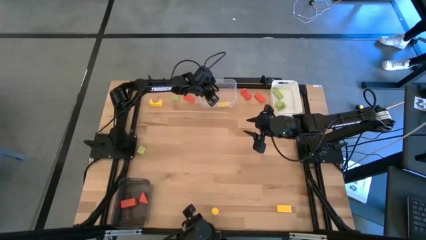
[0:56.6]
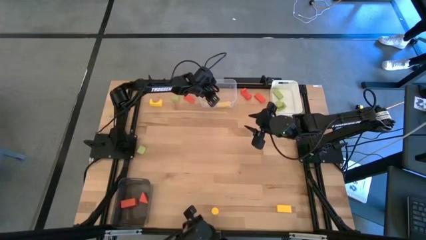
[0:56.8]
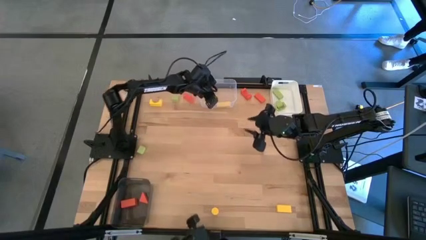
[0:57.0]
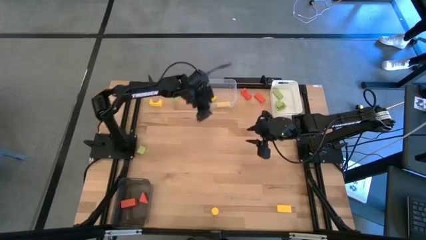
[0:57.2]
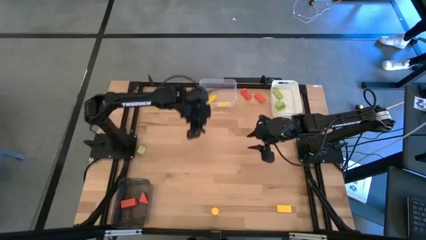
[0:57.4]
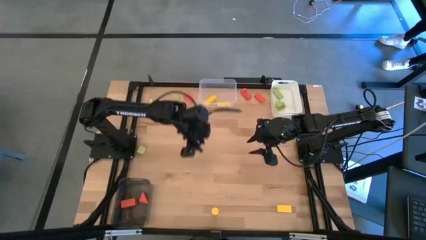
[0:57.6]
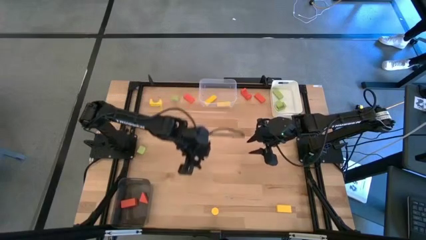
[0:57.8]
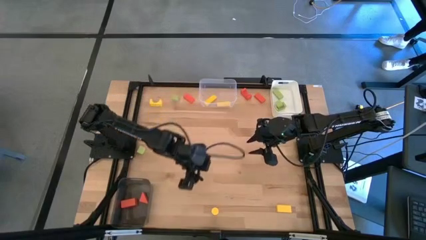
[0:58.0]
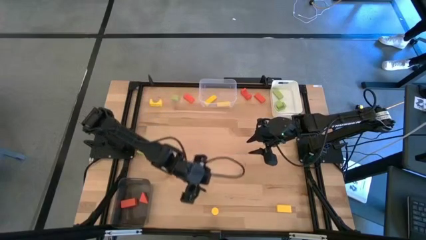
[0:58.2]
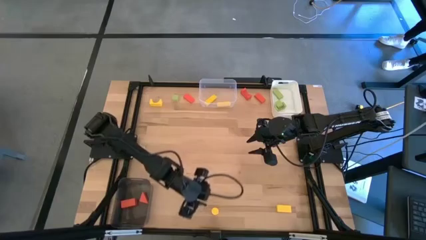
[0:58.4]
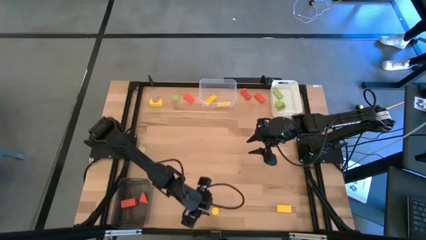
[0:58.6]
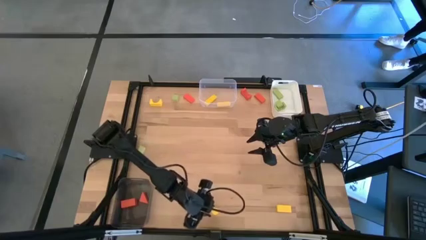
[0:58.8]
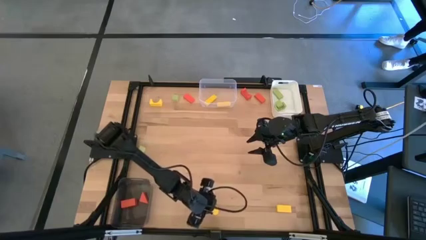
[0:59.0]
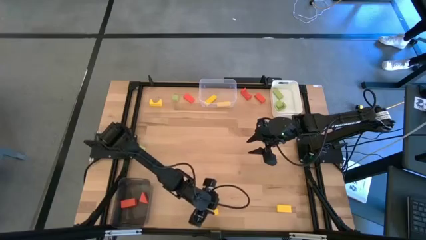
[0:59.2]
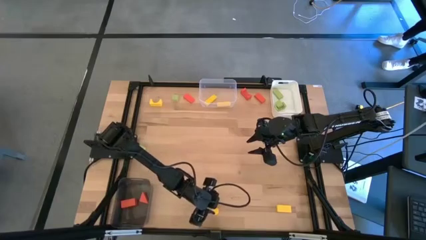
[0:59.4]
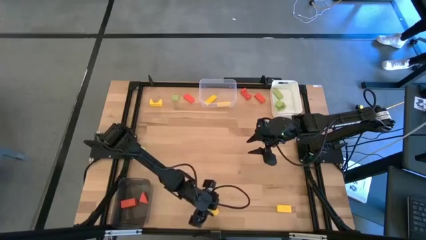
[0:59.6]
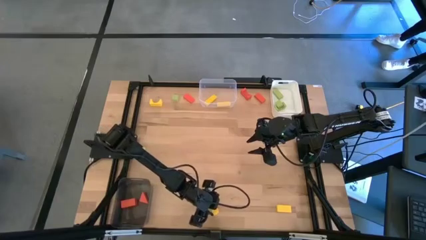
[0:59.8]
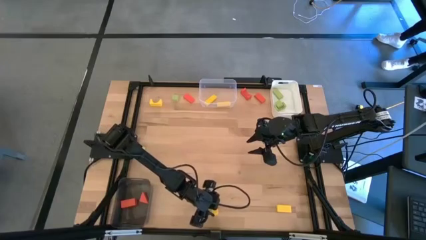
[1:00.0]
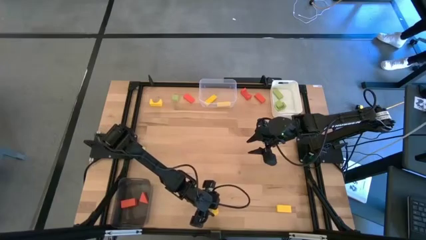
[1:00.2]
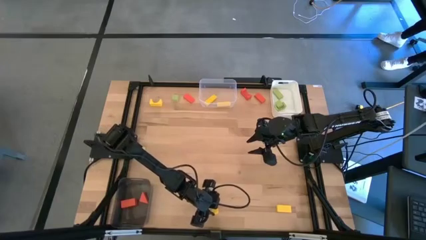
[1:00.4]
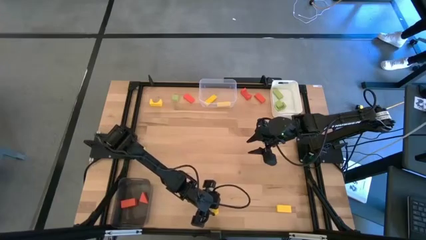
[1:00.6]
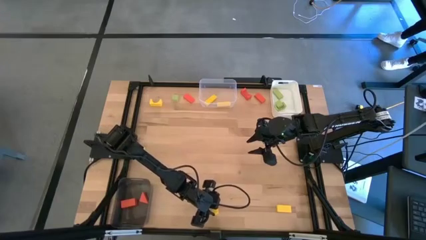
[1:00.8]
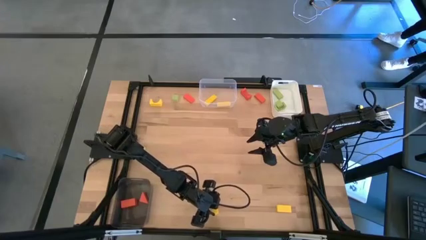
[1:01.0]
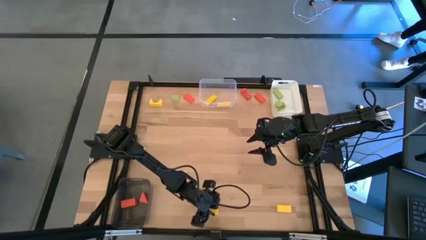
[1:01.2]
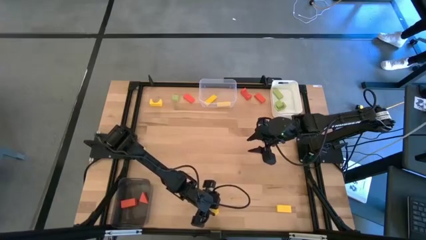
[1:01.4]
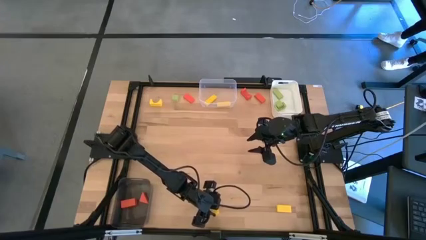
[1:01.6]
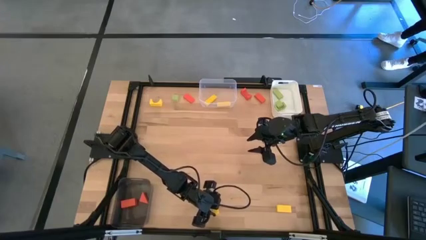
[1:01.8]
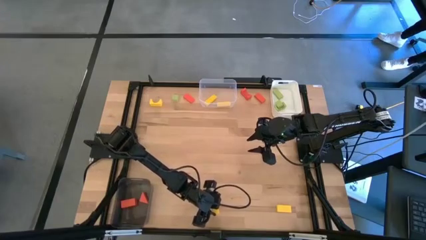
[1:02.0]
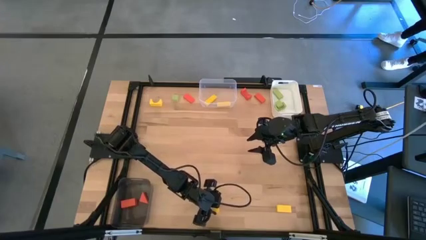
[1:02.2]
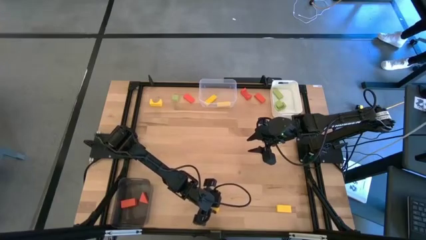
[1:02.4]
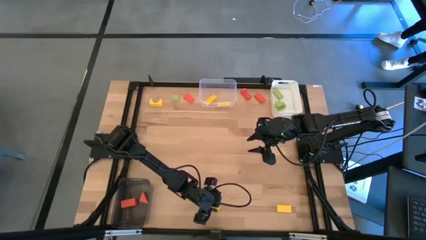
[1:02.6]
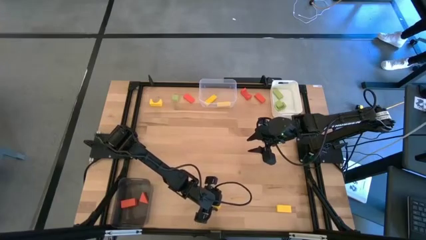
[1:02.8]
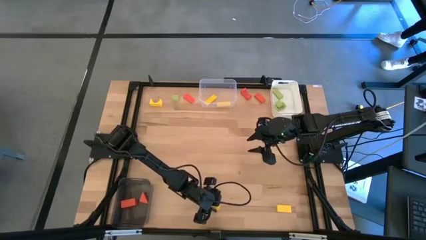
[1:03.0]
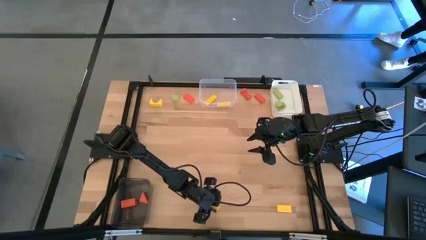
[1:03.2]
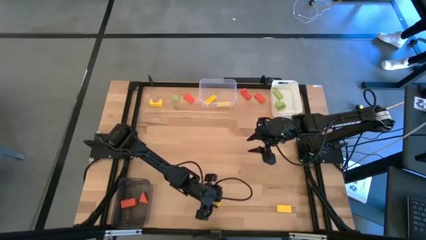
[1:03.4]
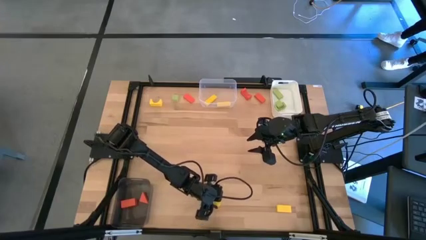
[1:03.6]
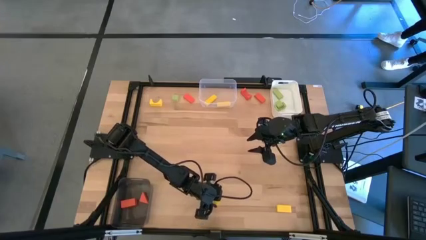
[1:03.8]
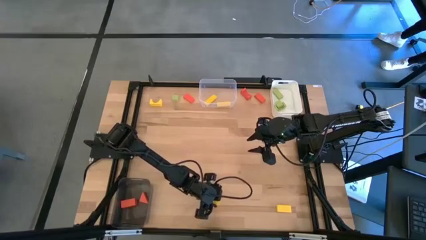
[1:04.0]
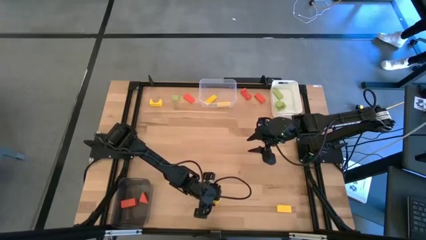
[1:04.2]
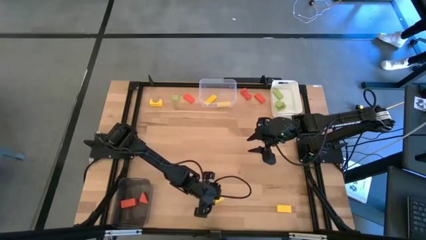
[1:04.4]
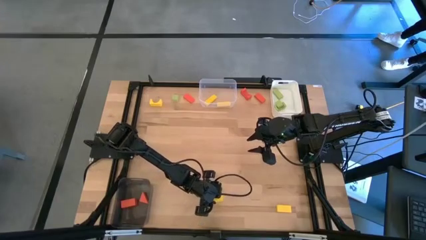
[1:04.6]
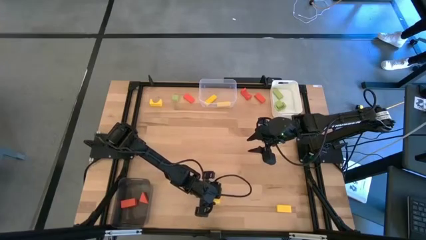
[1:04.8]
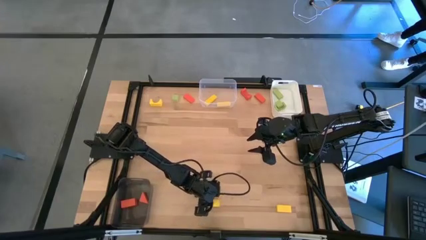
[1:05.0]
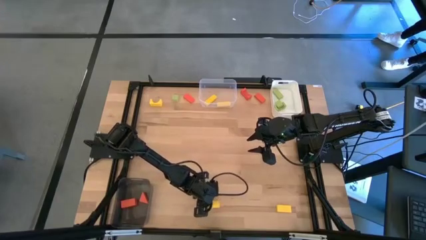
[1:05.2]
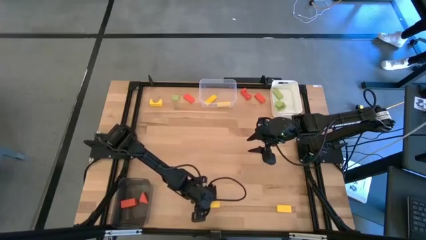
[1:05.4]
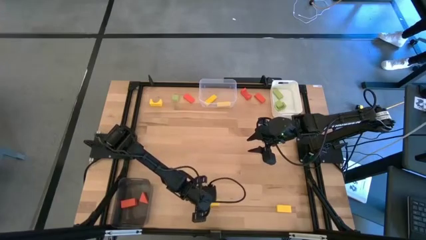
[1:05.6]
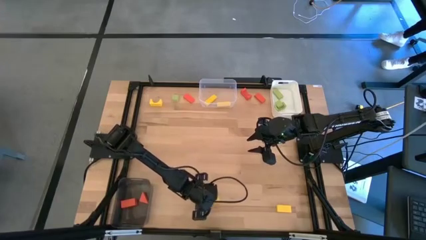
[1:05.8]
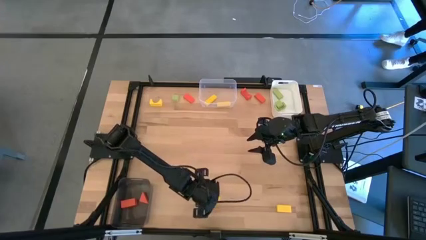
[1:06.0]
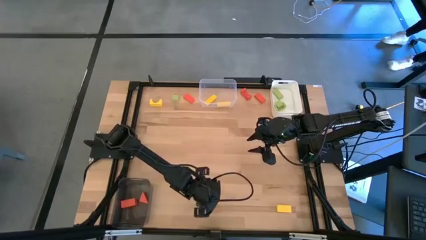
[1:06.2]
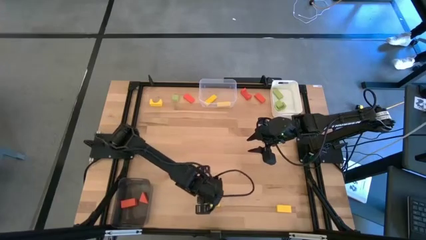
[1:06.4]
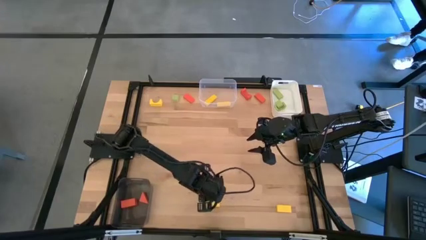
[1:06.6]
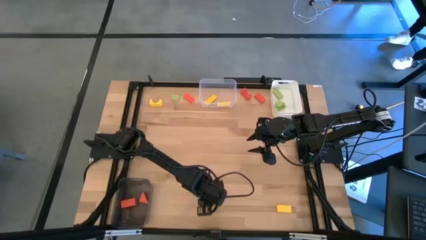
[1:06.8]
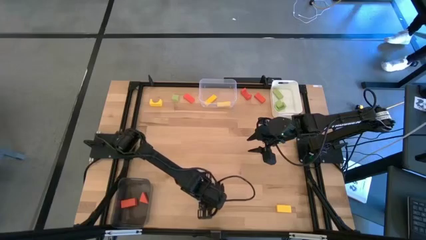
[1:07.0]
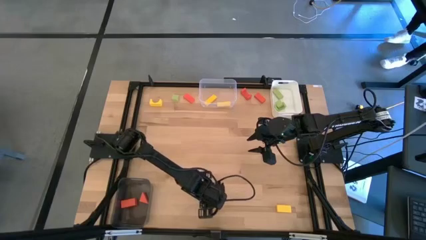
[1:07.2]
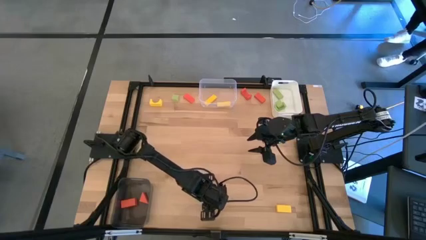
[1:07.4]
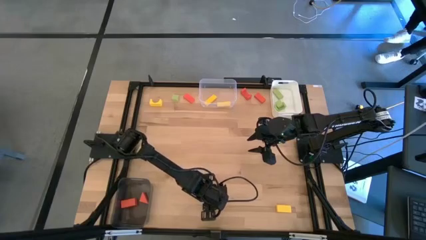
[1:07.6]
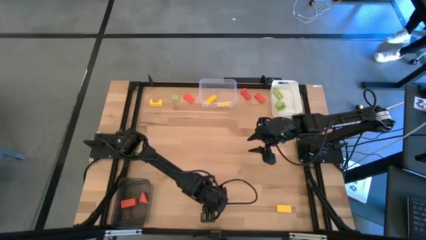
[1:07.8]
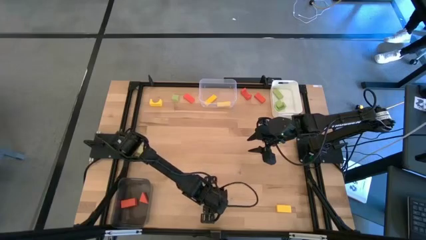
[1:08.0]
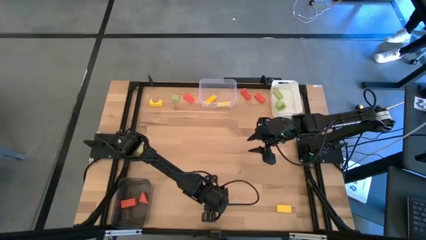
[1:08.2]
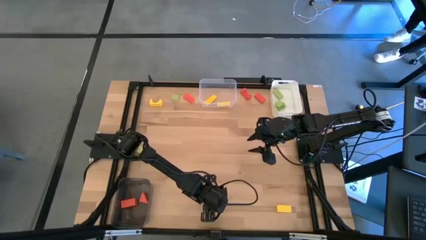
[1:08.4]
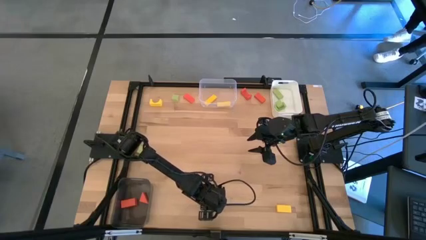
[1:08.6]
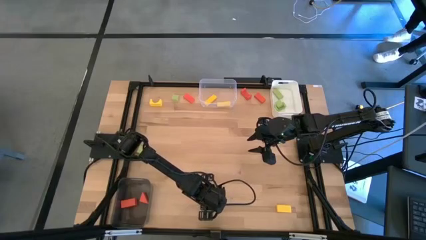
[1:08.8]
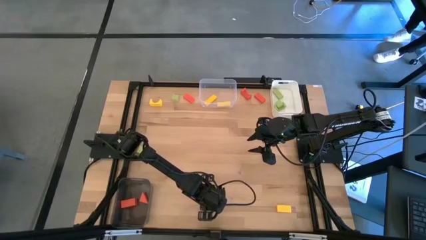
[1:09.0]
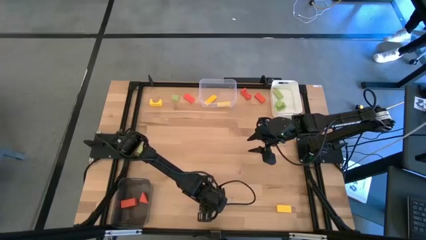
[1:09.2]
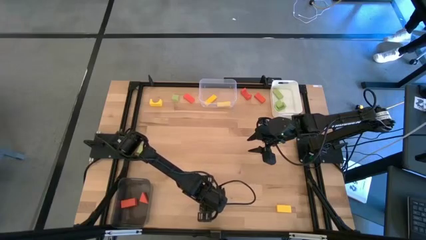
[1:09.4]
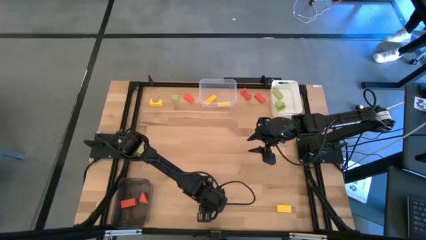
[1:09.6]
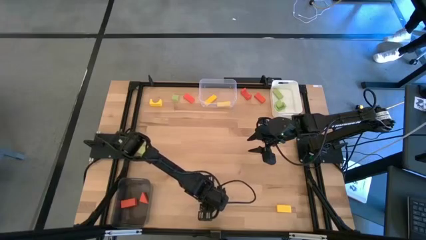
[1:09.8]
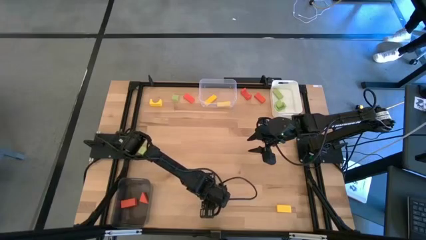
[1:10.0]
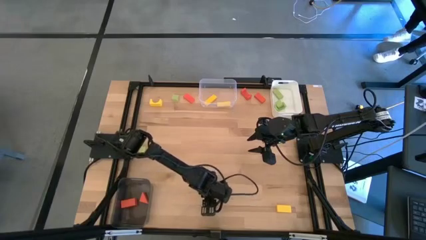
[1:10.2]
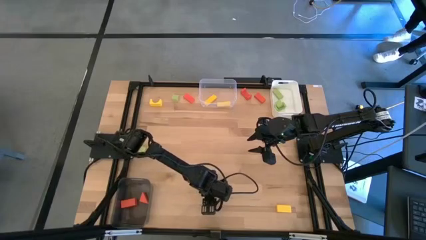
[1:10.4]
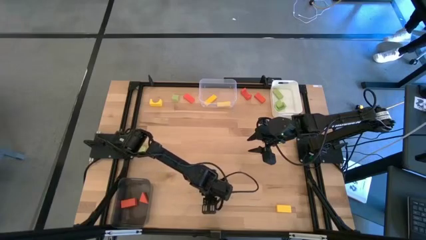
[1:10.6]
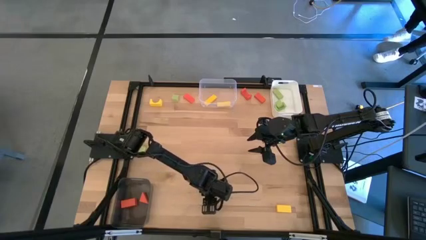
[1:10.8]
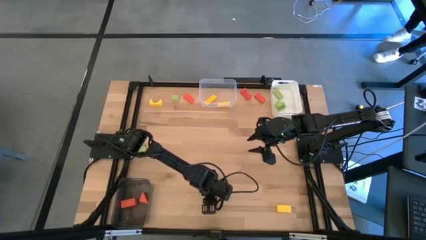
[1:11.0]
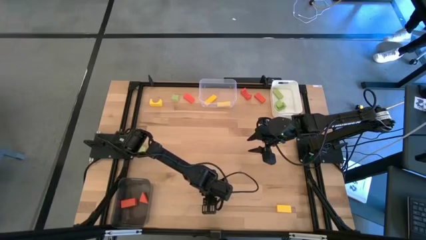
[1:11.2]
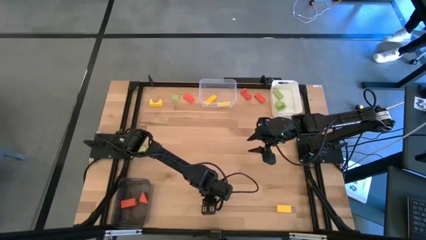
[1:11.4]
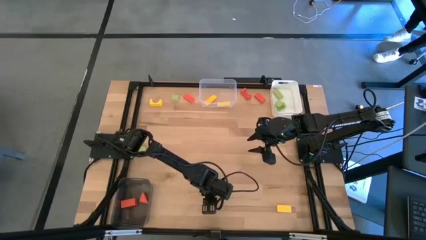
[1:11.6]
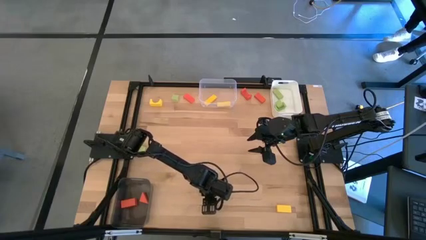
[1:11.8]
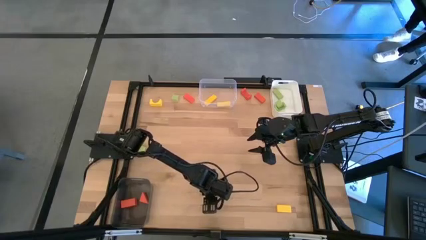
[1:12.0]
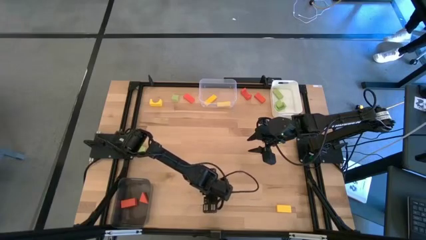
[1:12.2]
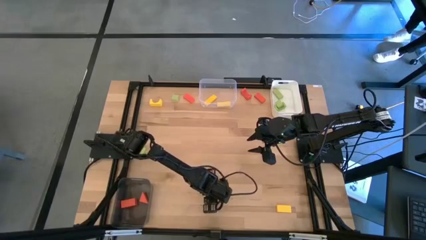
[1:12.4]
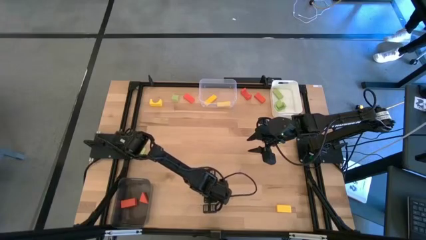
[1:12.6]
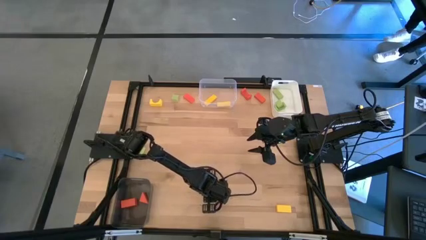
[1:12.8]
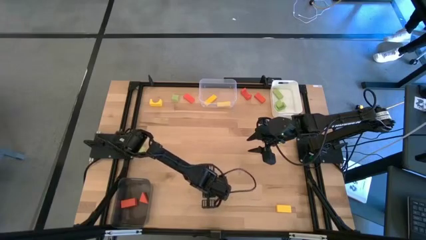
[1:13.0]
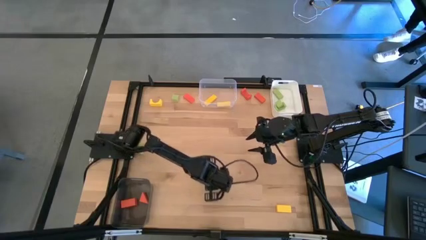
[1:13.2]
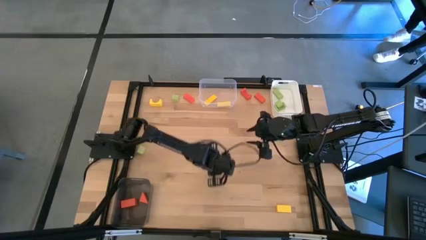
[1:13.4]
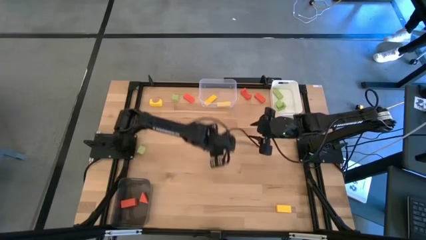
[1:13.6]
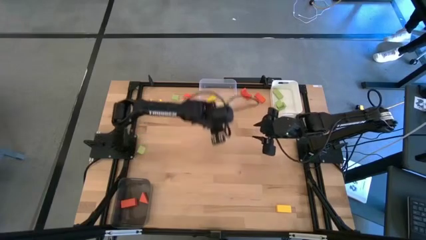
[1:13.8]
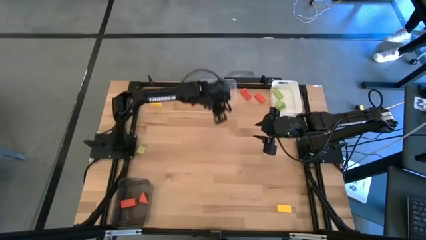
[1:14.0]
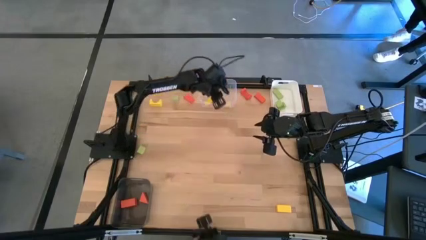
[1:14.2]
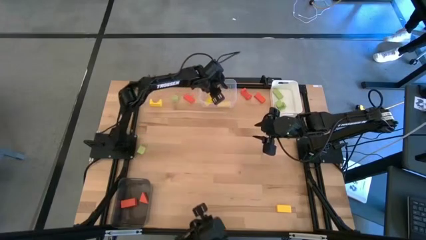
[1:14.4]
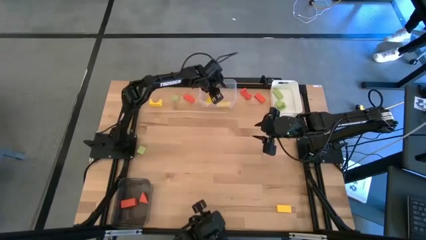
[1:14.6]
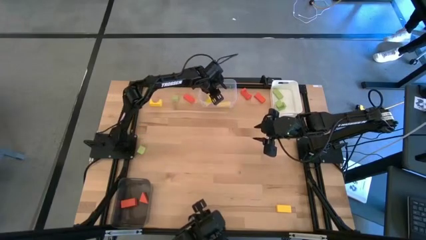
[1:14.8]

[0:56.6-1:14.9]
Task: Sort & place blocks by color
Put the yellow cylindrical block into the transparent bin
